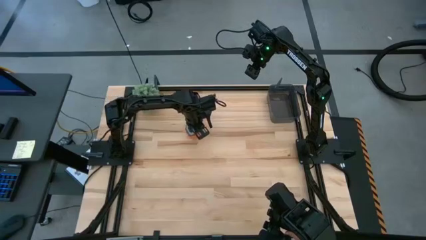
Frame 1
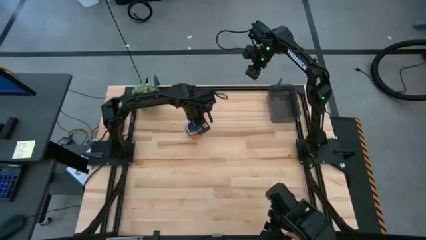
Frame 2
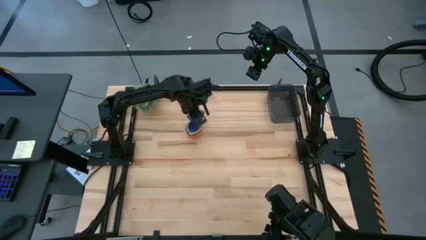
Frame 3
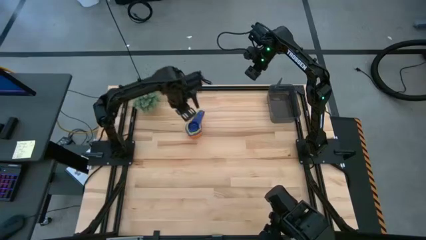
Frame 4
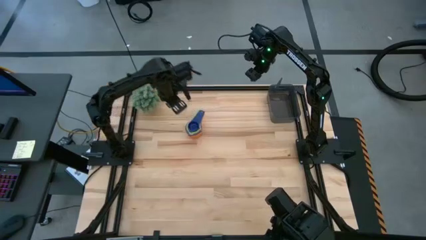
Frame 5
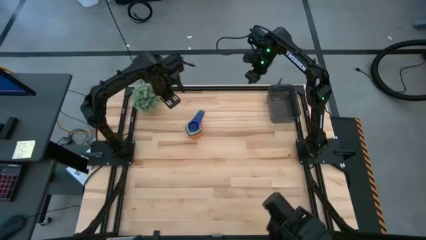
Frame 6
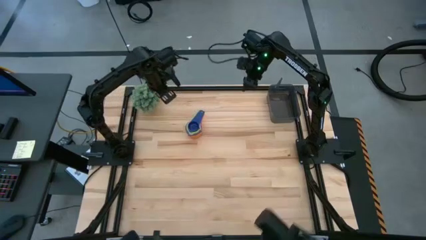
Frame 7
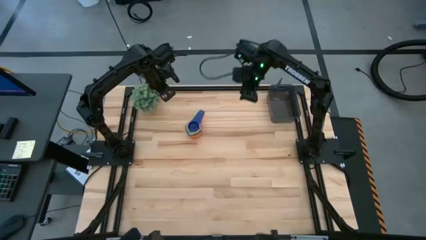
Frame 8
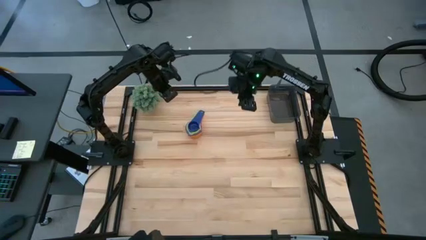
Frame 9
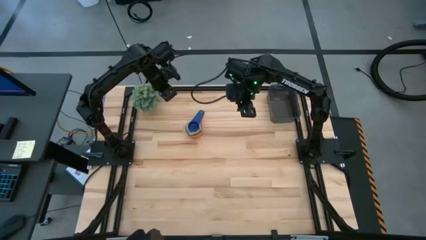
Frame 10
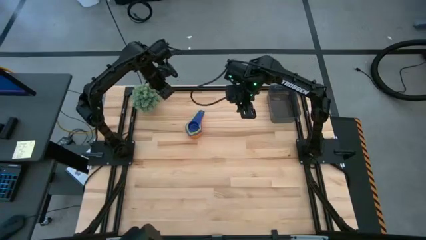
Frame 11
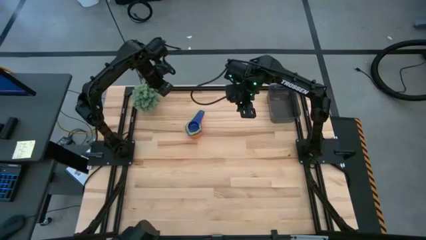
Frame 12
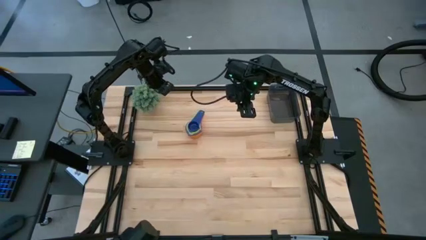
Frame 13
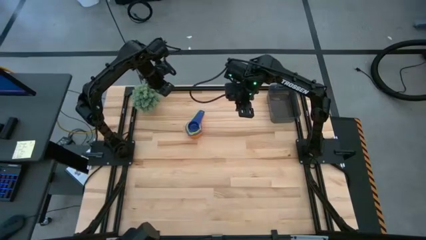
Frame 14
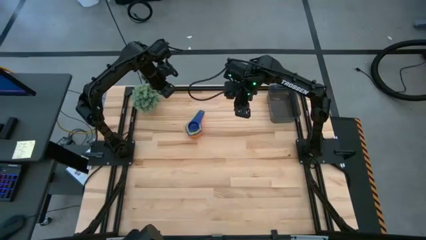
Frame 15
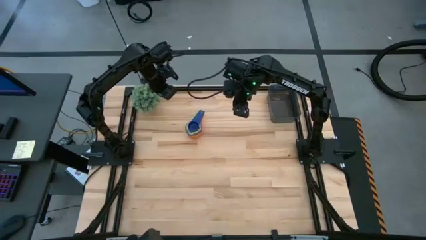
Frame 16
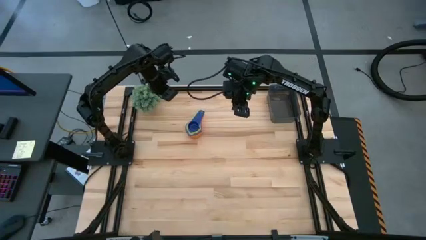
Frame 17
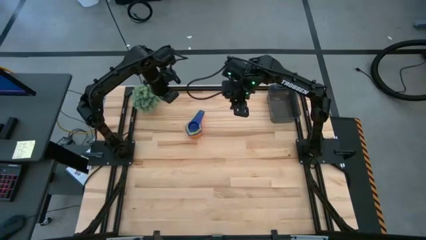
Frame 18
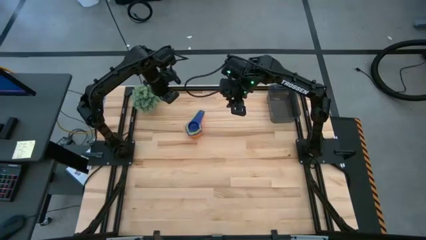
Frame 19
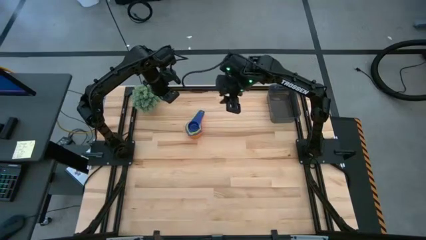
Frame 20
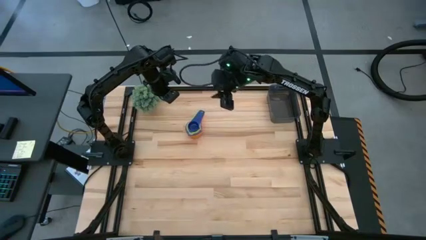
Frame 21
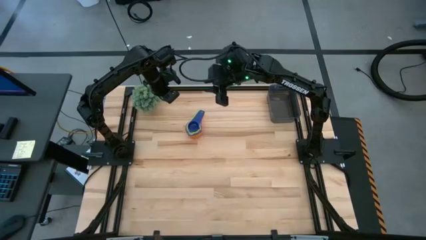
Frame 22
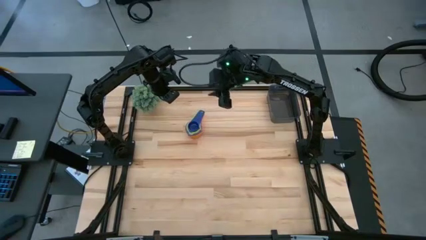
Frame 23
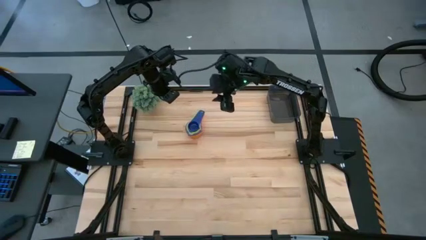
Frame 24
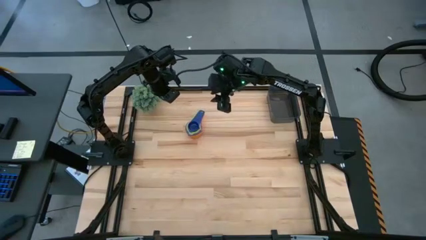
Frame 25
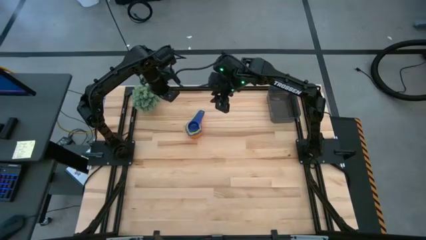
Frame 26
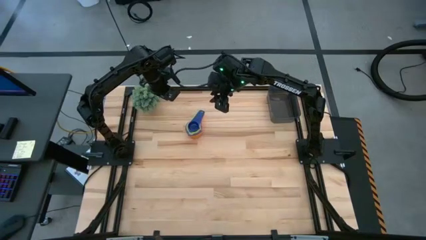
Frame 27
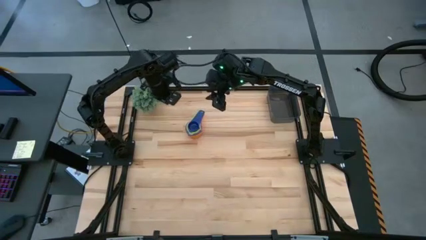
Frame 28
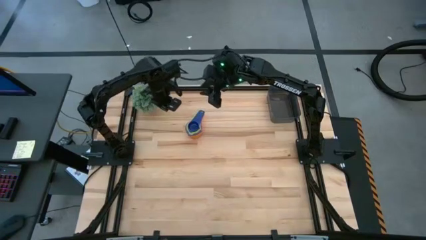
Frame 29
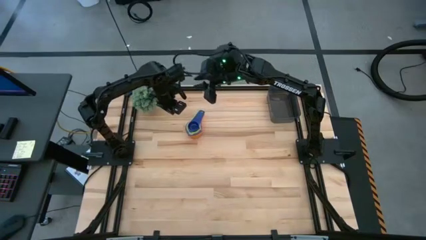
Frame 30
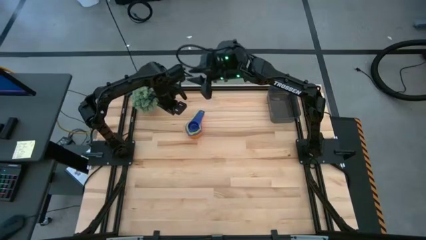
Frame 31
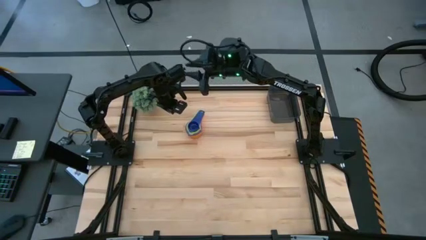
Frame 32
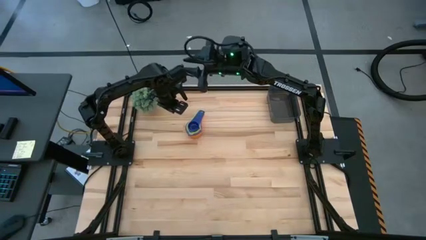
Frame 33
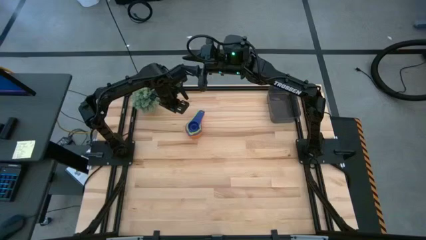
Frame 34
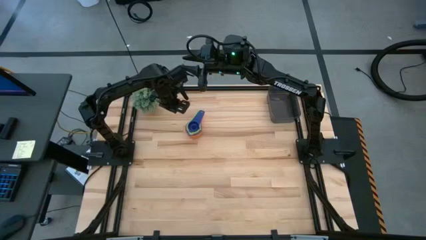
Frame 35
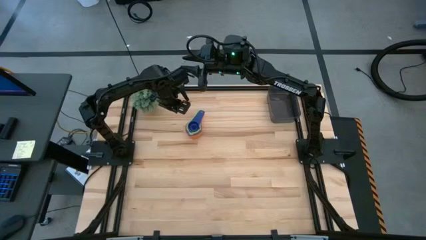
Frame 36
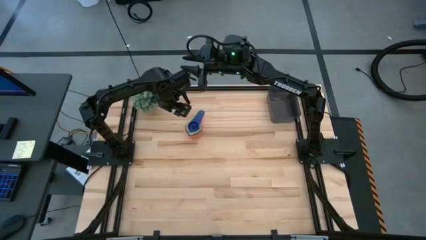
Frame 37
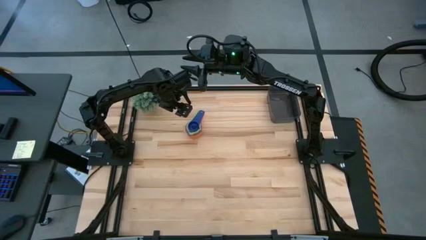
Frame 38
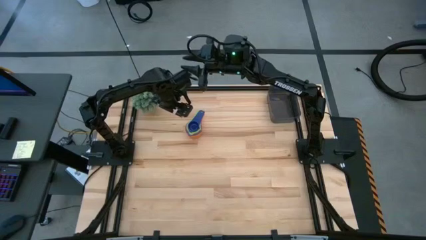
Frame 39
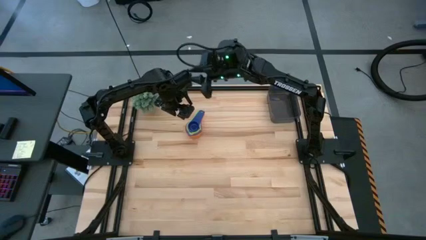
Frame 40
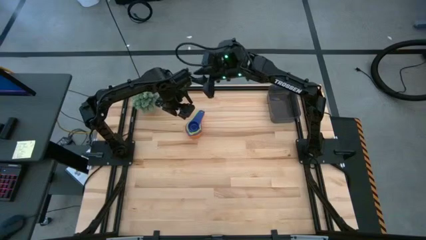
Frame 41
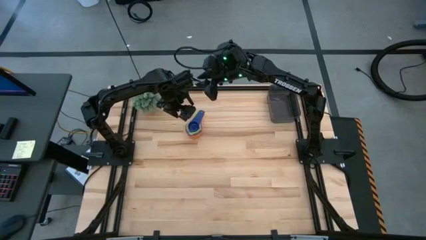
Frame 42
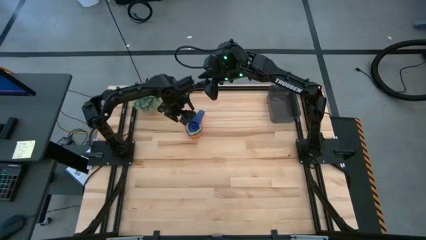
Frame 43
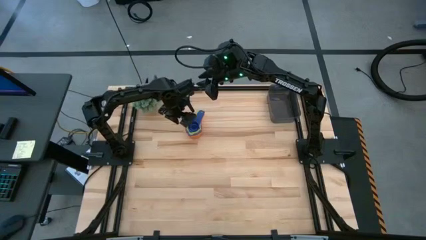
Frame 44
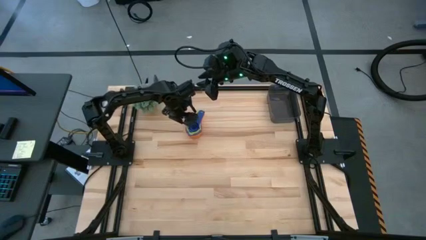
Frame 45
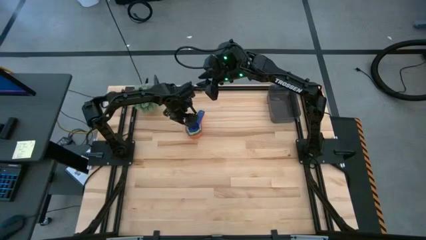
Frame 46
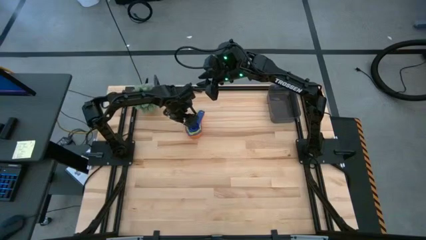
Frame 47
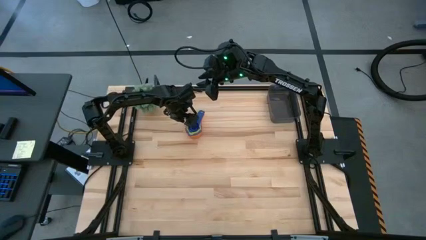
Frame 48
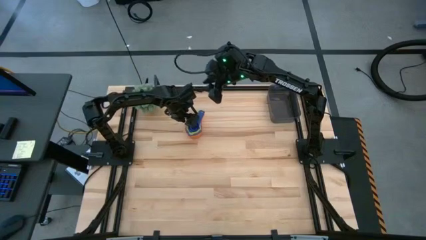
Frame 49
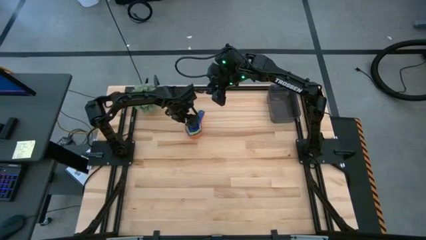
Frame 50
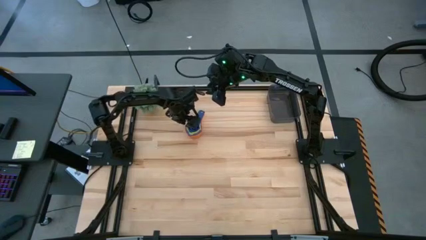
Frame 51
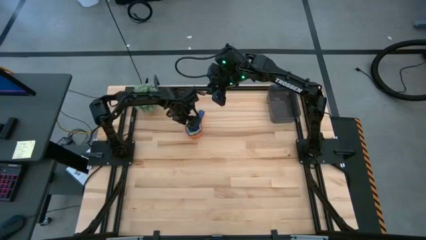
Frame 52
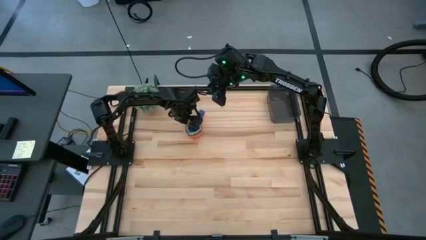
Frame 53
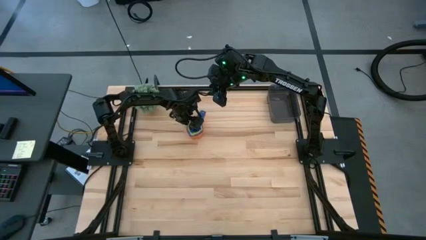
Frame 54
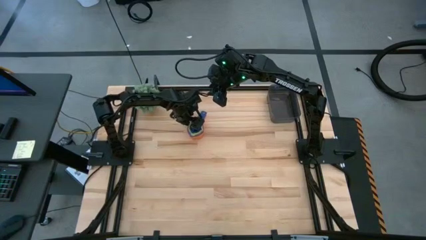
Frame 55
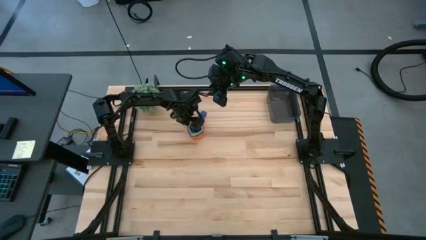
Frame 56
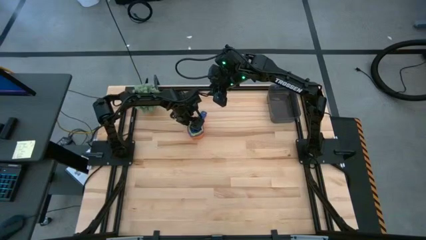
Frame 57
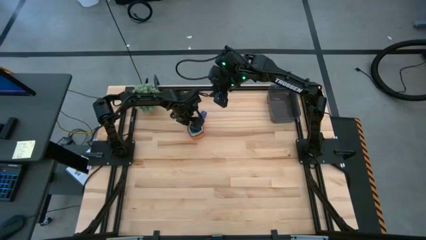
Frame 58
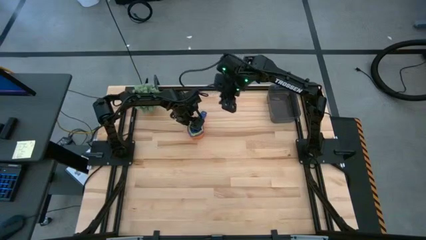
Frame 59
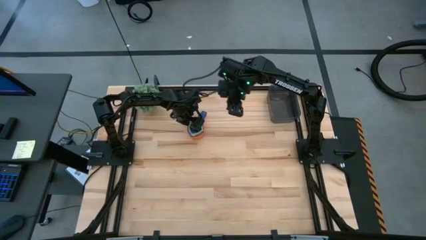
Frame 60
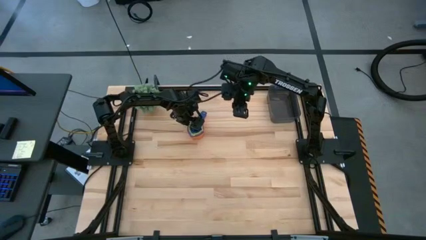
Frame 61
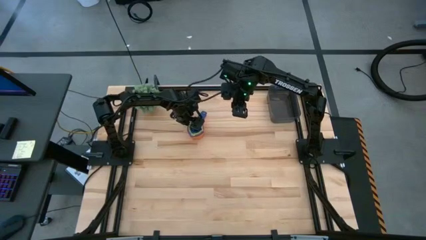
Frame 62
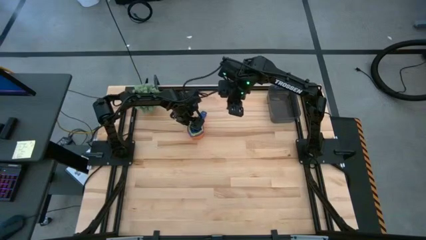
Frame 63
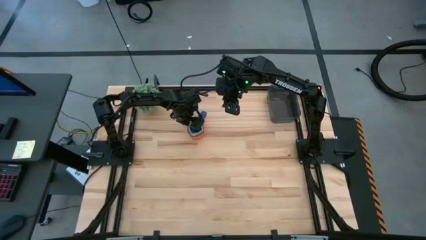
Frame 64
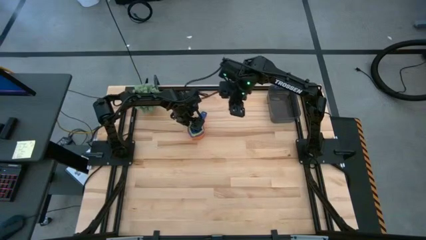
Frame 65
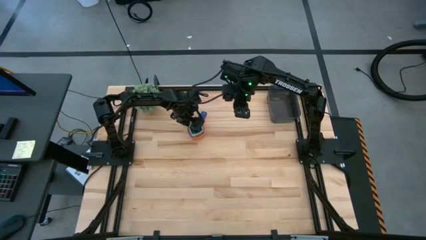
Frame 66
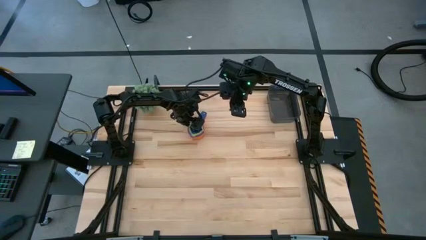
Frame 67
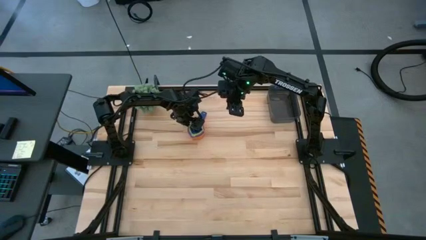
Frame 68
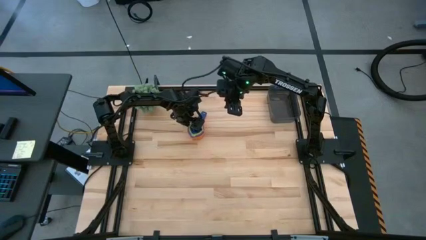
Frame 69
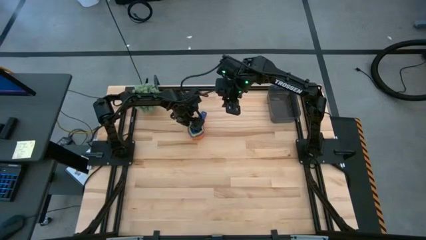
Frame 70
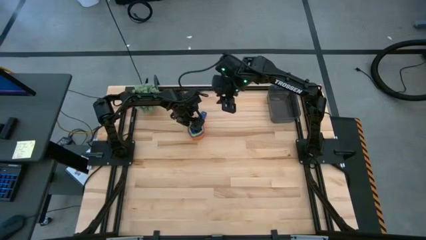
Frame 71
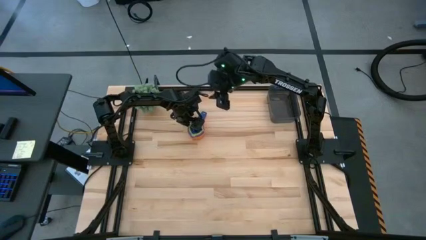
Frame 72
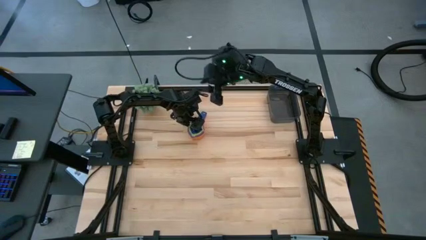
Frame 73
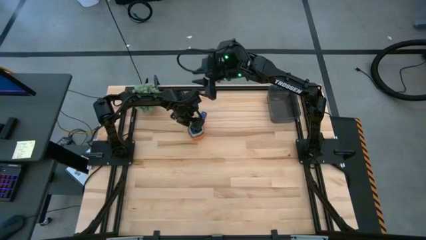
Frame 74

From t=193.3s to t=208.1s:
Task: Nest measuring cups in basket
Put the nested measuring cups into the black bin

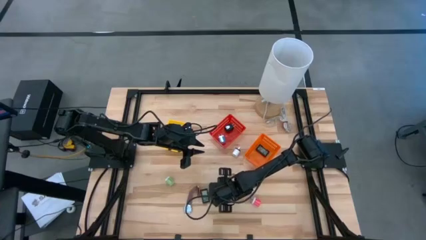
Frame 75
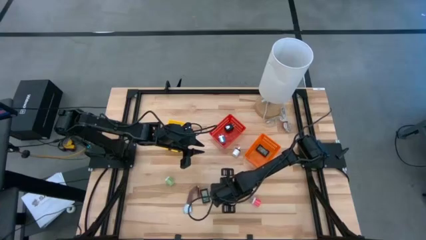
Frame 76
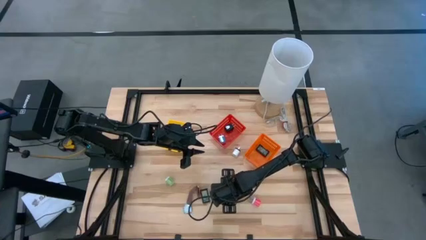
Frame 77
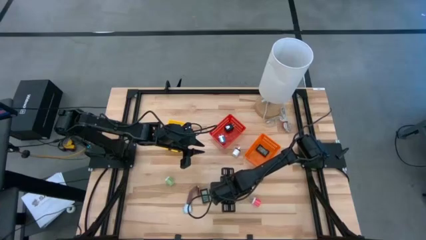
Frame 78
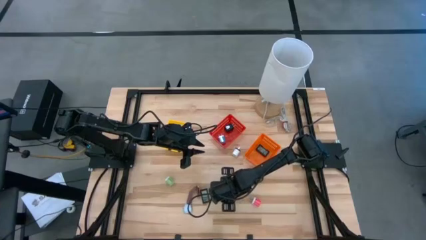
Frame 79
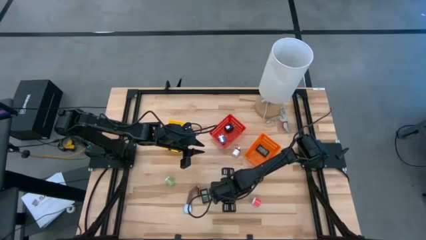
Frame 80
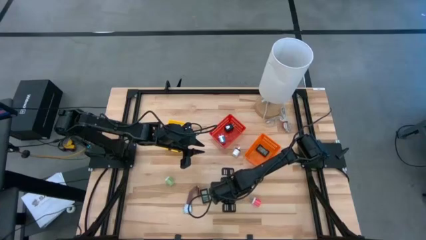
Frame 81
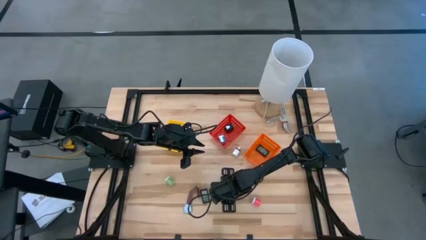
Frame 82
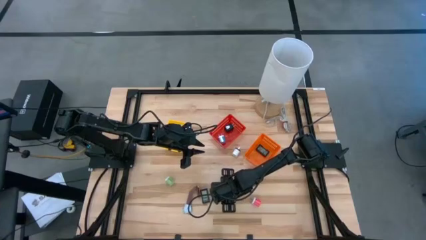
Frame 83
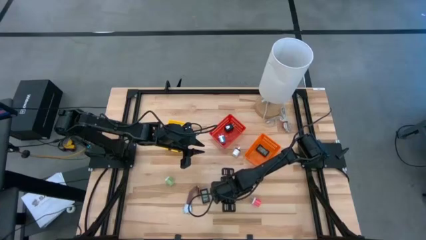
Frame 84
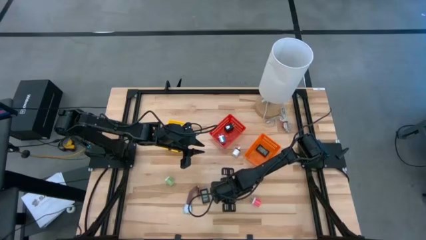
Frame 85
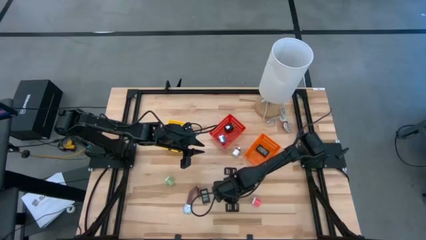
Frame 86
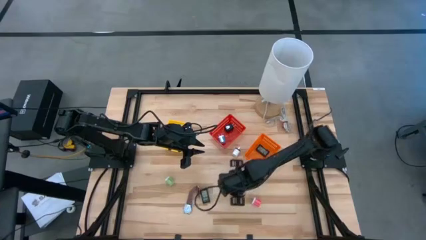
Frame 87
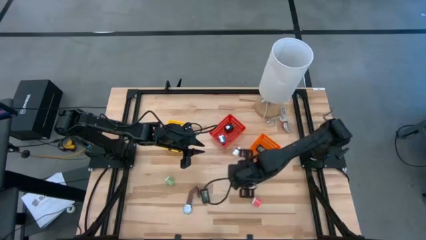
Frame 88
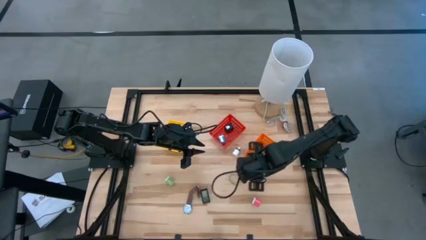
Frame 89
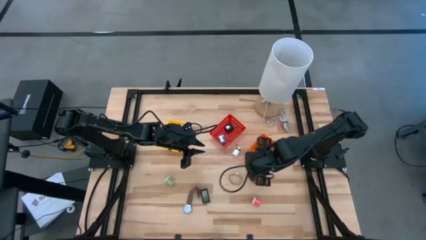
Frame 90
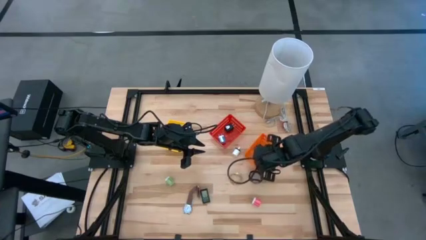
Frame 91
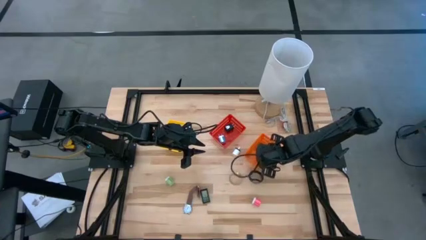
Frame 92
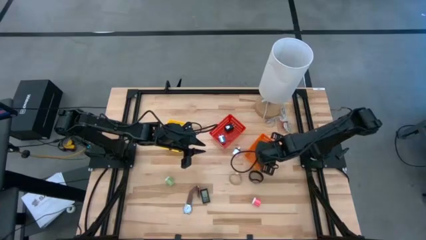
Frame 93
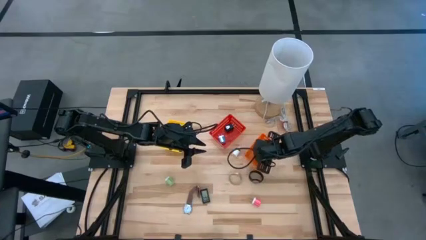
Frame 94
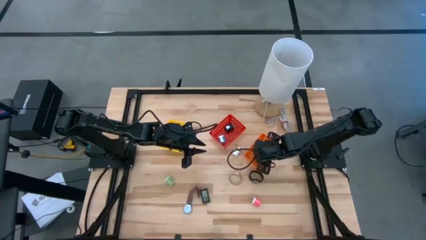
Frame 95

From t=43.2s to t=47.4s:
Task: Pick & Place Office items
Put the red digital clock into the orange bin
